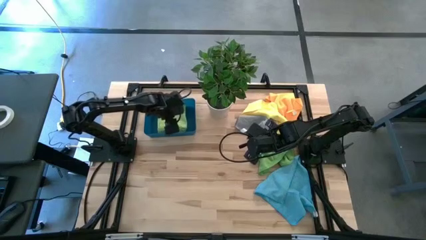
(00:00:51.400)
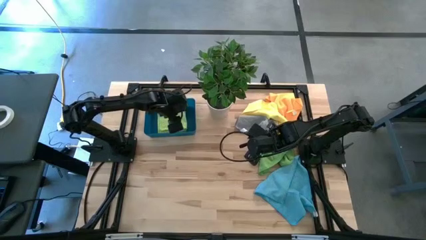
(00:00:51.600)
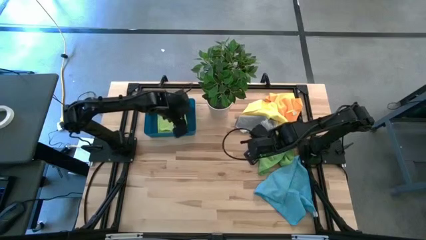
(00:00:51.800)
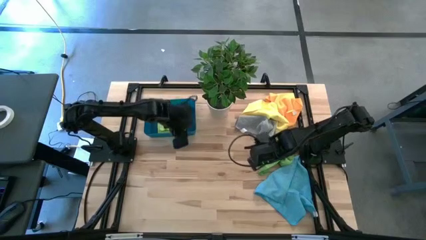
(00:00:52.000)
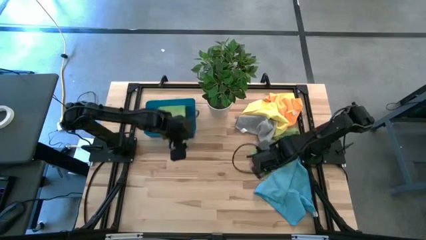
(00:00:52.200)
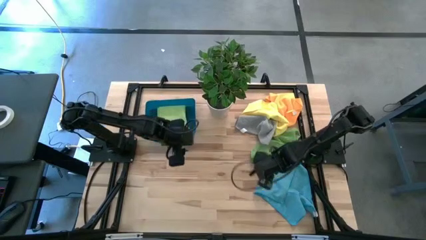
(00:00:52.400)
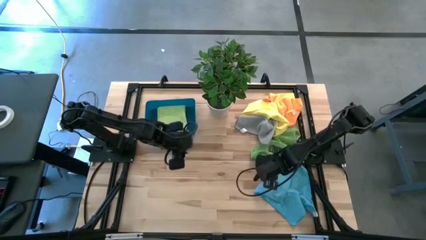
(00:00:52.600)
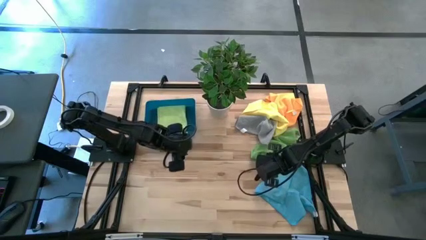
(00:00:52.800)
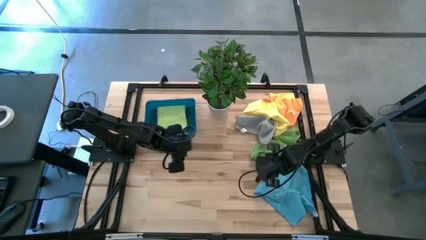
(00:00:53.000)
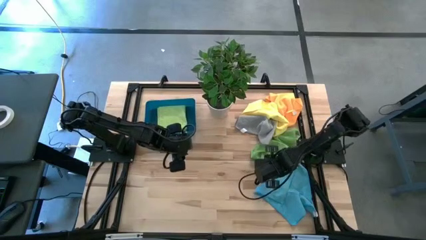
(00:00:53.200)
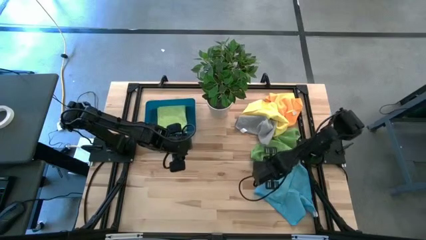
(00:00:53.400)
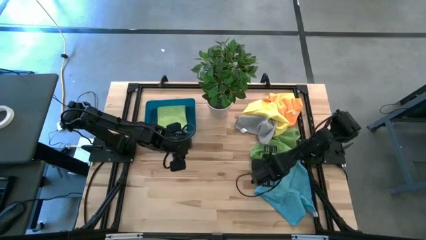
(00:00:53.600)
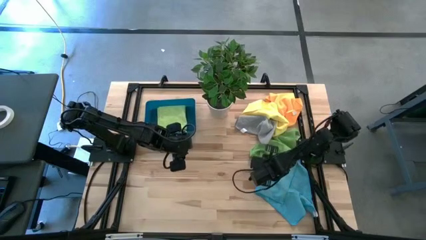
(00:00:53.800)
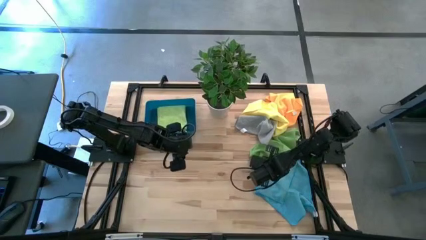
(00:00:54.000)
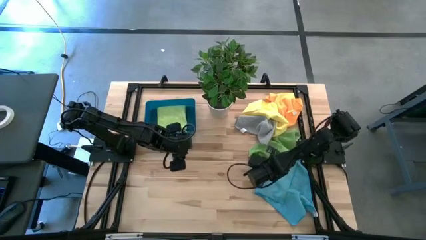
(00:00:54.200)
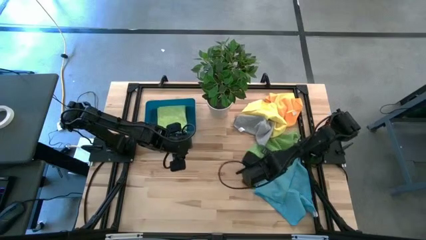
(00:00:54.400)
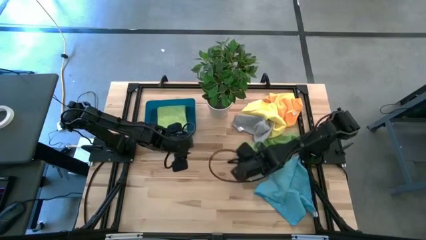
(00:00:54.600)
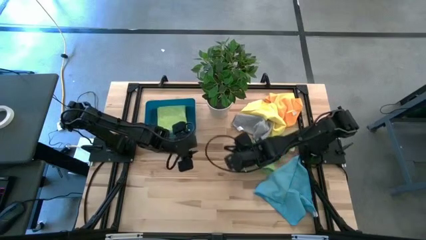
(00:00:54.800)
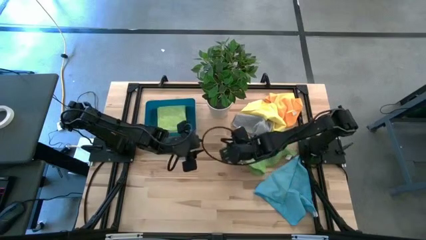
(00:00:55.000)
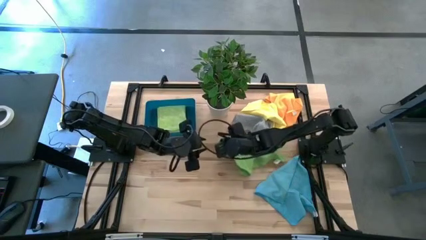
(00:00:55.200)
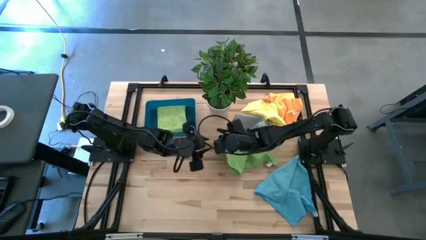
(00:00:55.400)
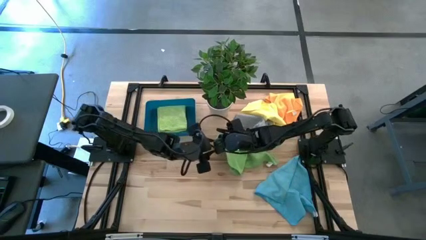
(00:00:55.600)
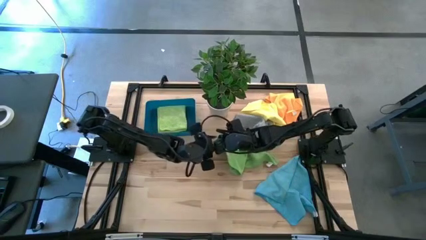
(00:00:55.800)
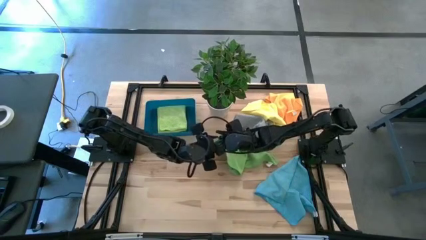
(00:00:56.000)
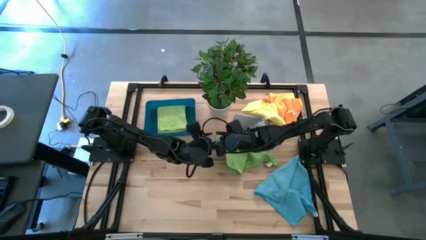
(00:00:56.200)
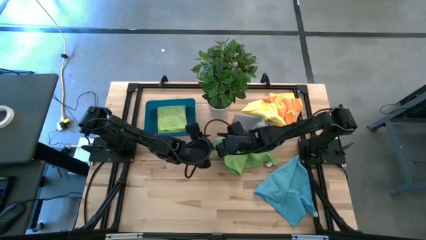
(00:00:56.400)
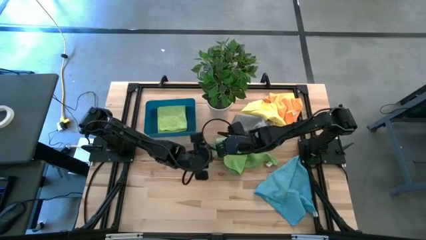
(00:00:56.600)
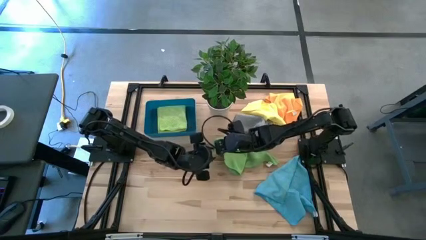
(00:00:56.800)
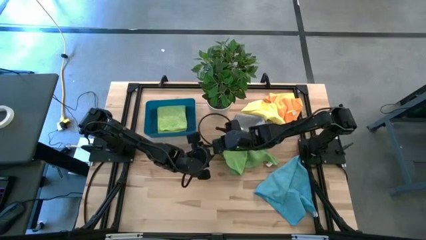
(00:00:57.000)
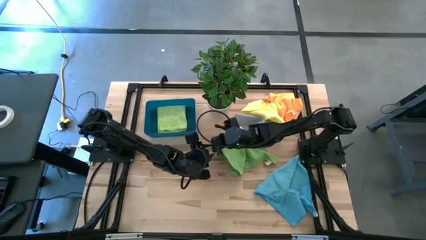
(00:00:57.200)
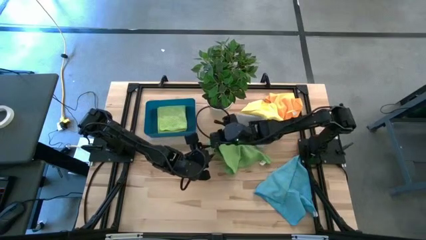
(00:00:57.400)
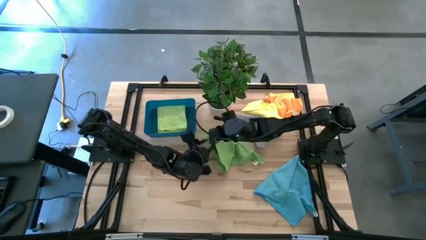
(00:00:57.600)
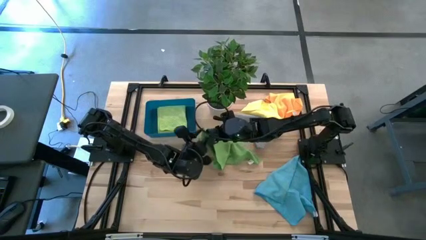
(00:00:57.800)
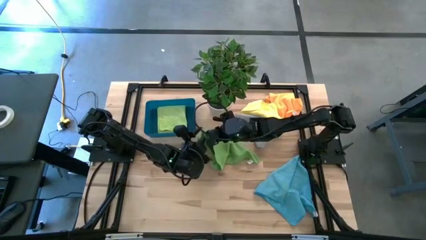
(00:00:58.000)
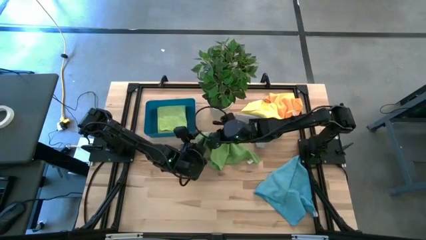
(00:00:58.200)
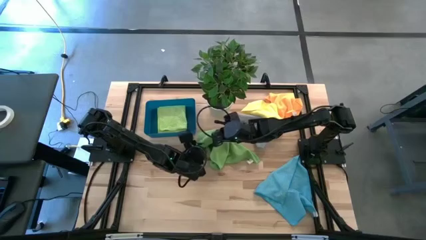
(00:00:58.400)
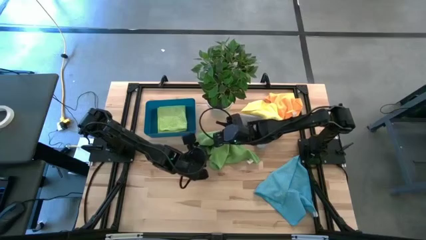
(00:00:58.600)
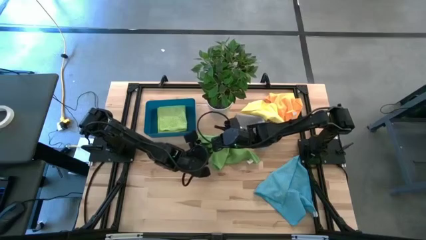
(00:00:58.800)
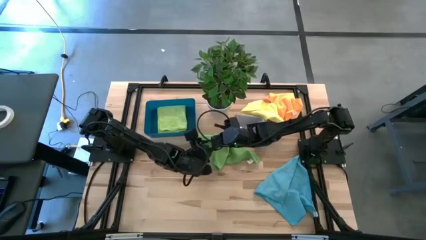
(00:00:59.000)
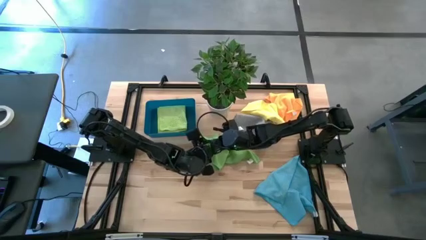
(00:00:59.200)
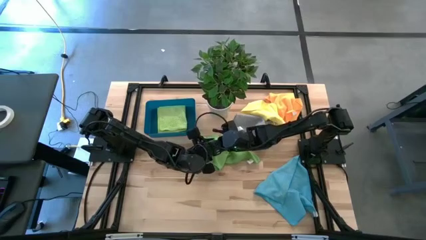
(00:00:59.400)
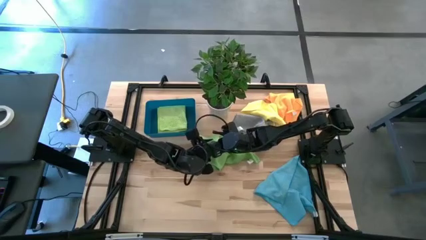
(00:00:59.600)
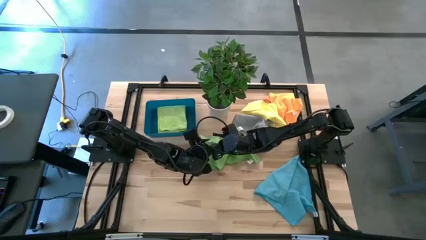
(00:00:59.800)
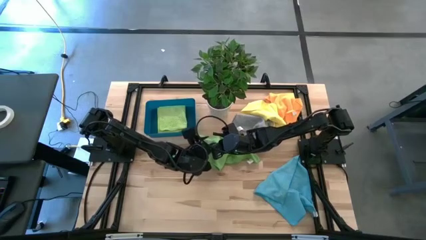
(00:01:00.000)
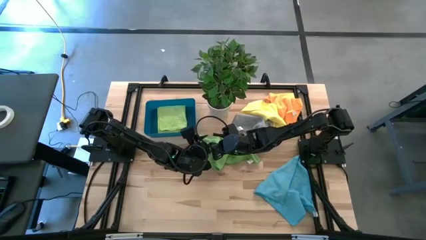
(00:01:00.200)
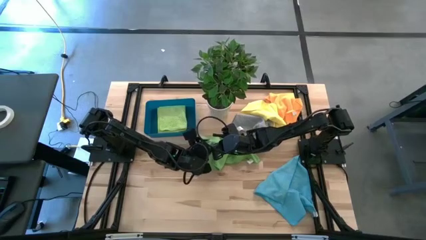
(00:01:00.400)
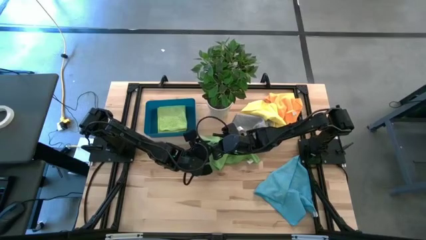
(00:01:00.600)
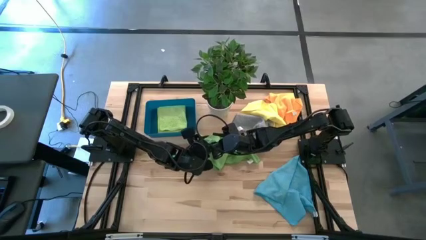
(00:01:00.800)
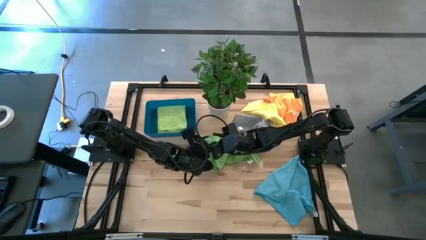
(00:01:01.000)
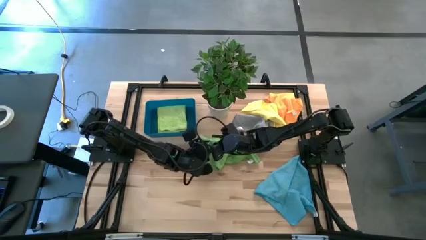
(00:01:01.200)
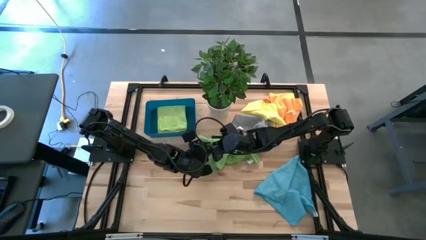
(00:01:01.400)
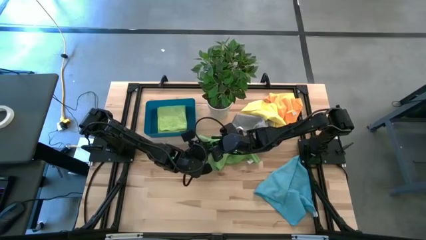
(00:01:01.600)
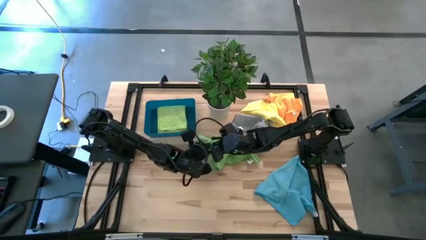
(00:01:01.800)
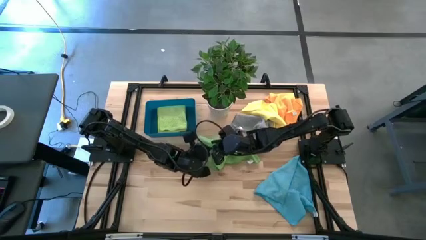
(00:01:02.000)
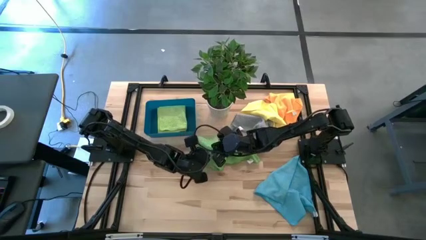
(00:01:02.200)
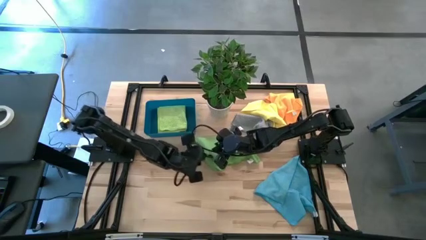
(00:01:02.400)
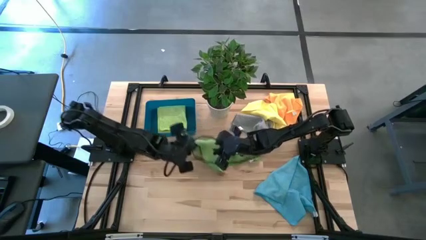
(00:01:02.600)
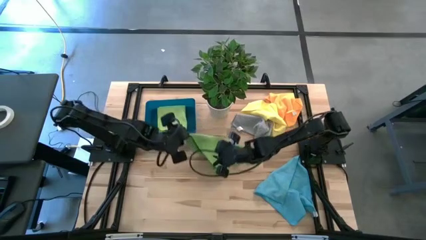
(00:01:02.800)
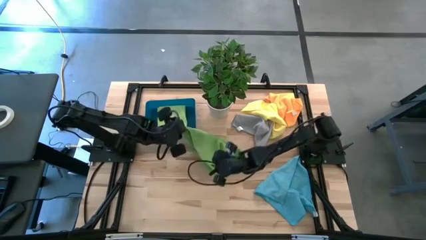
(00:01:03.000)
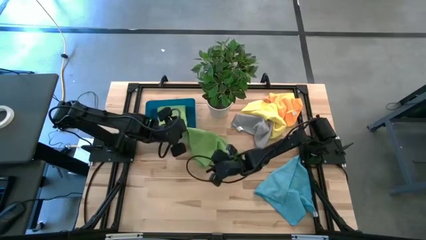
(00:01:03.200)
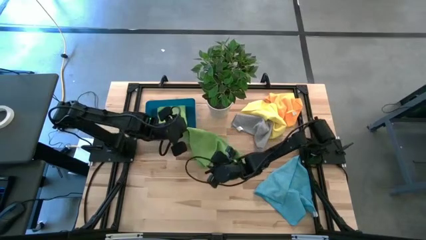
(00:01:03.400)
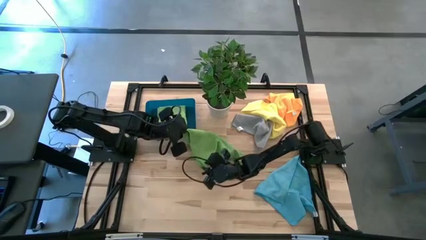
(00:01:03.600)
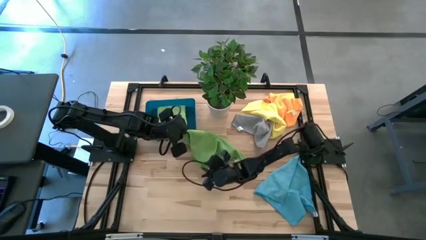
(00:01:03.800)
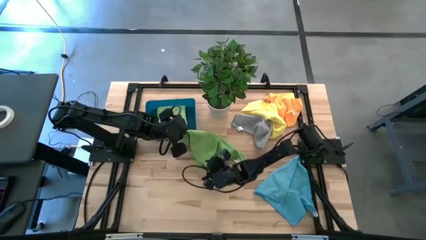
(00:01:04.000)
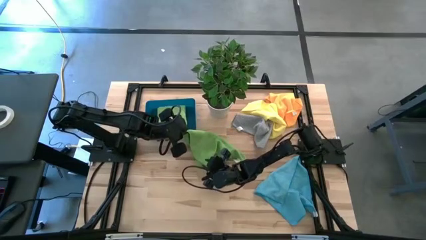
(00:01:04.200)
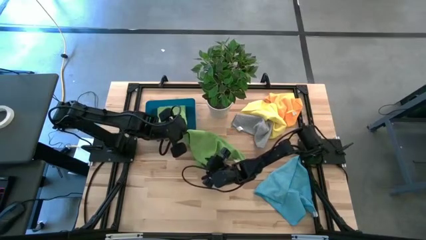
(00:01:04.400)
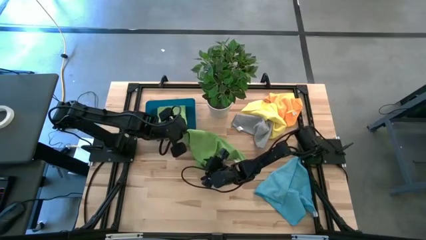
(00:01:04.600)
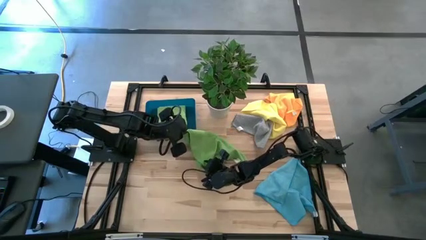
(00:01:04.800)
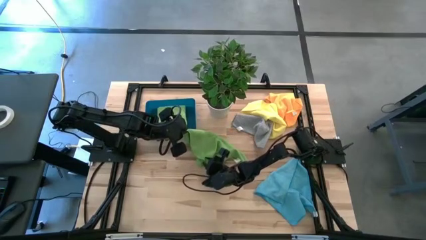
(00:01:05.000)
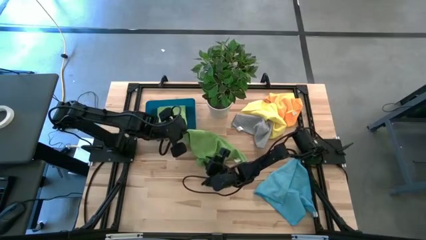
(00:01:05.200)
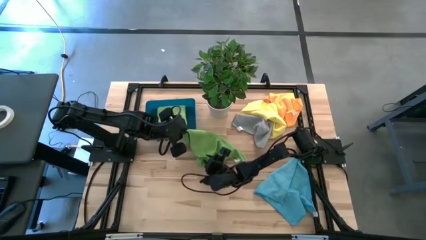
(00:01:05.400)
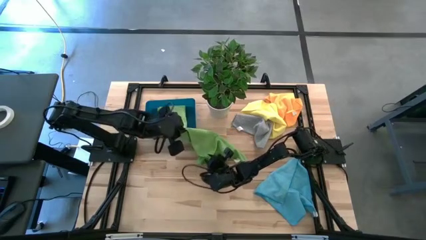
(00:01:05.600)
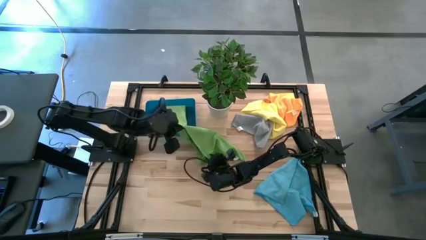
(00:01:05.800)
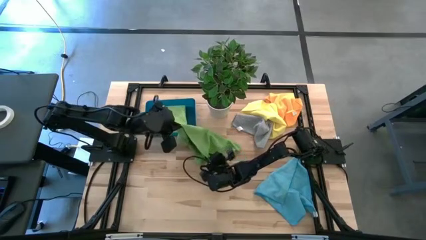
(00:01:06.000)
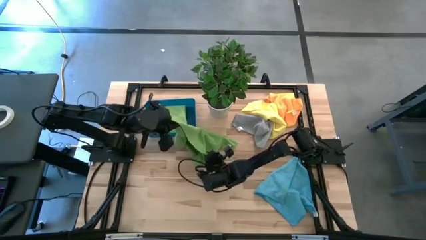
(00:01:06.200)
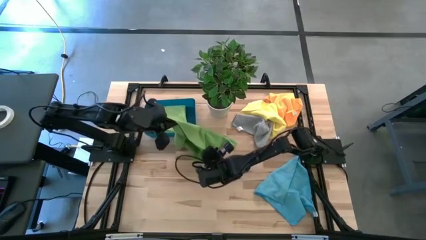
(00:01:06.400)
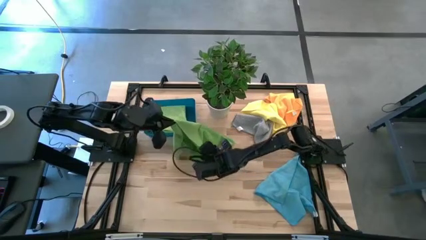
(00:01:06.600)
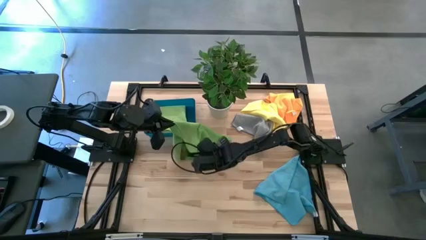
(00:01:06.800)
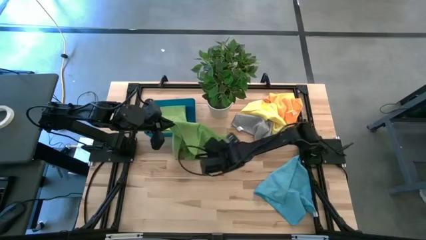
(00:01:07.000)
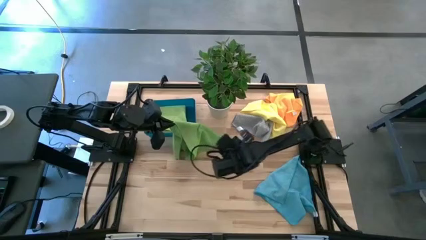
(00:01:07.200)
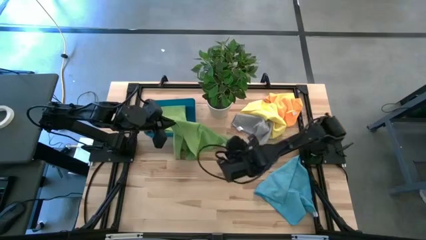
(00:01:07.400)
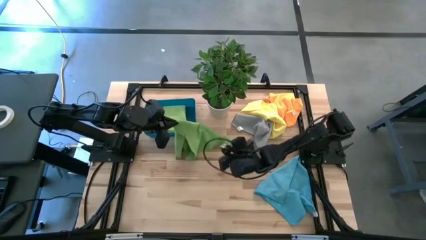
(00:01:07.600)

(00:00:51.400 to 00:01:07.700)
Task: Fold microfiber towels
Fold the green towel
